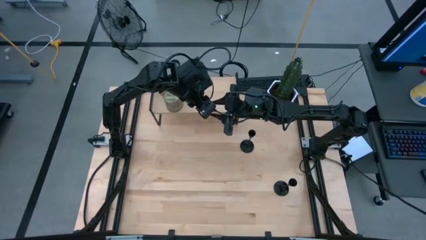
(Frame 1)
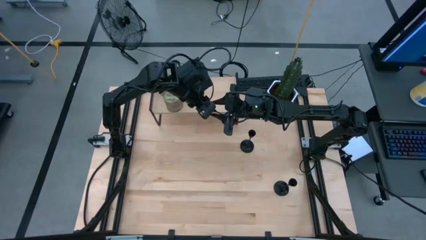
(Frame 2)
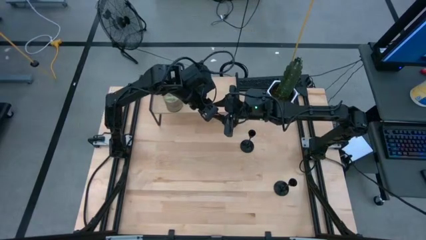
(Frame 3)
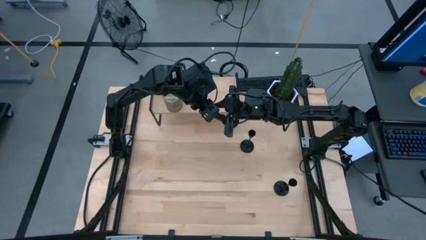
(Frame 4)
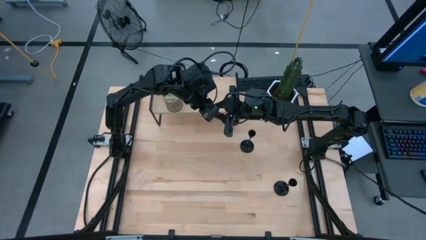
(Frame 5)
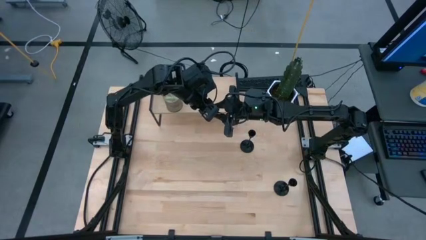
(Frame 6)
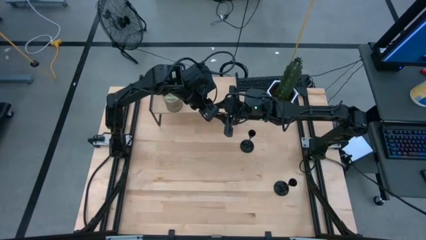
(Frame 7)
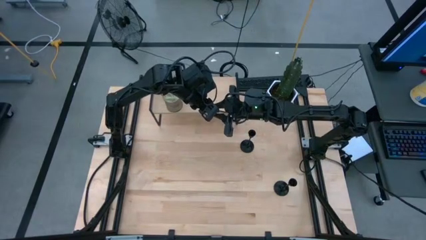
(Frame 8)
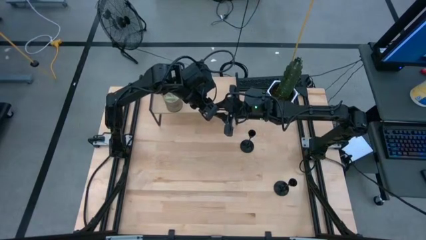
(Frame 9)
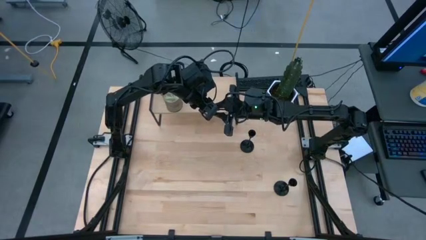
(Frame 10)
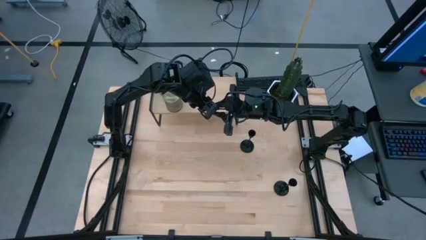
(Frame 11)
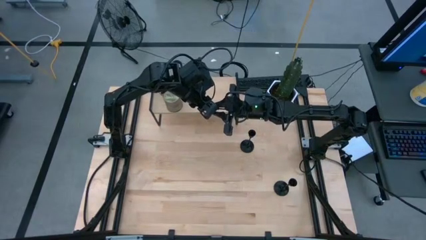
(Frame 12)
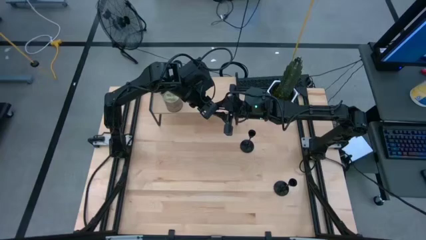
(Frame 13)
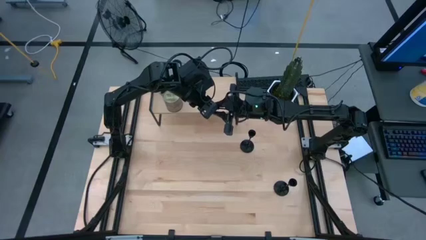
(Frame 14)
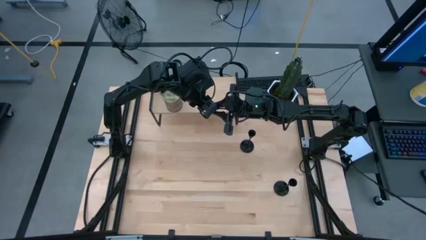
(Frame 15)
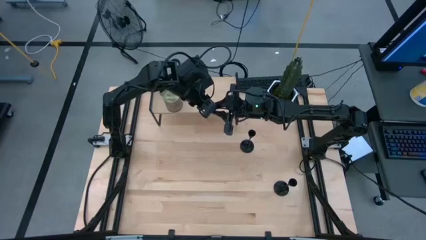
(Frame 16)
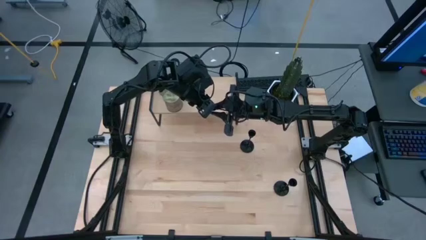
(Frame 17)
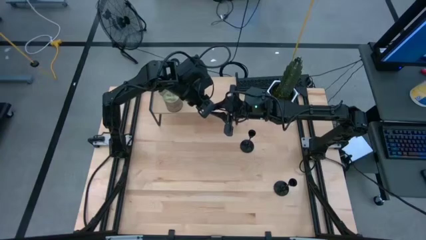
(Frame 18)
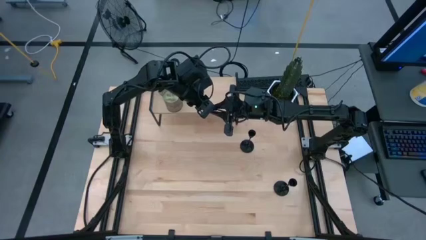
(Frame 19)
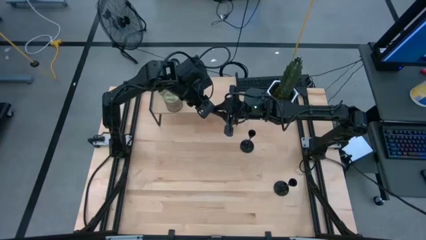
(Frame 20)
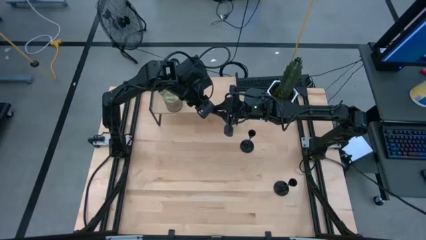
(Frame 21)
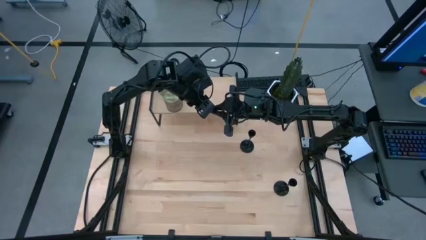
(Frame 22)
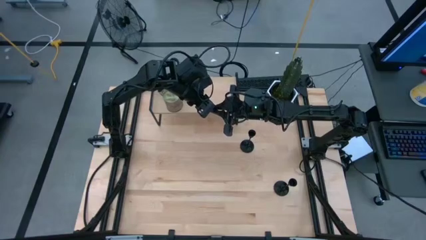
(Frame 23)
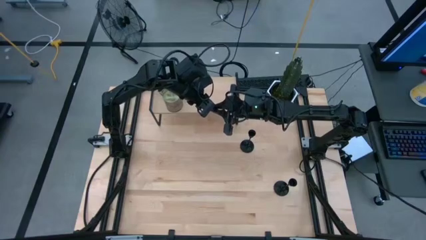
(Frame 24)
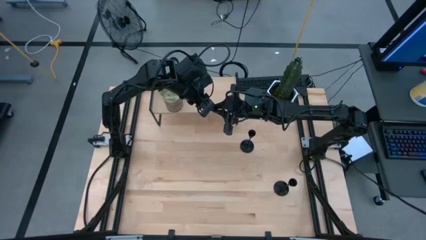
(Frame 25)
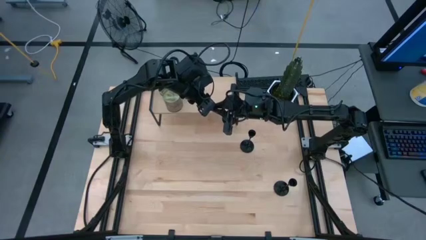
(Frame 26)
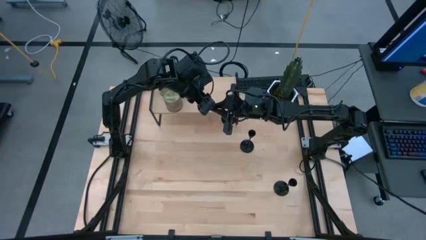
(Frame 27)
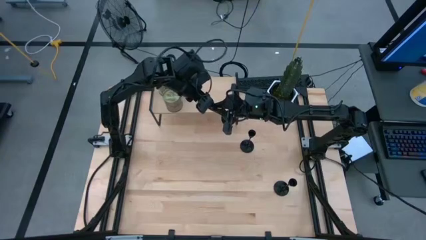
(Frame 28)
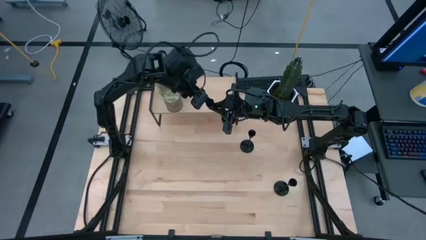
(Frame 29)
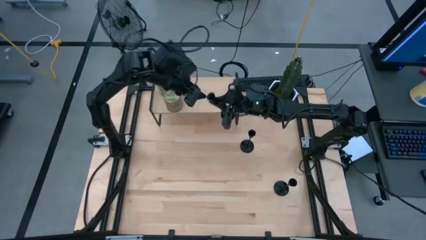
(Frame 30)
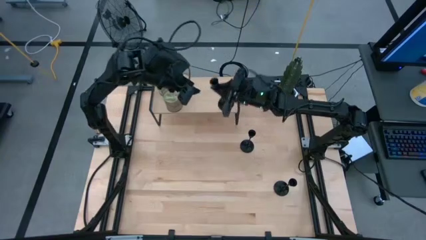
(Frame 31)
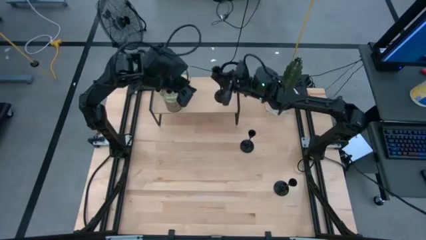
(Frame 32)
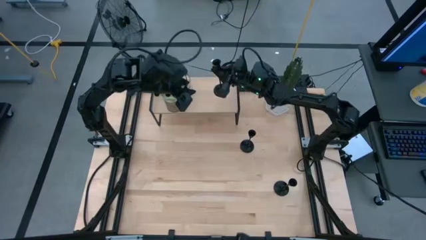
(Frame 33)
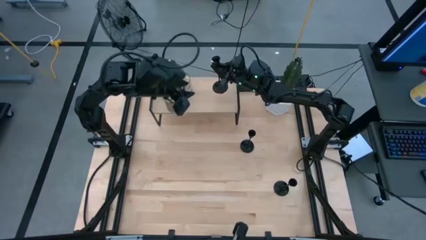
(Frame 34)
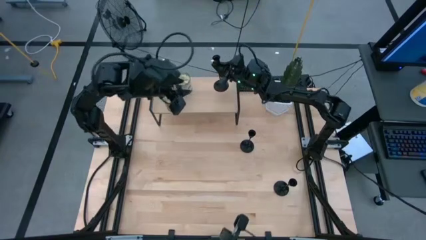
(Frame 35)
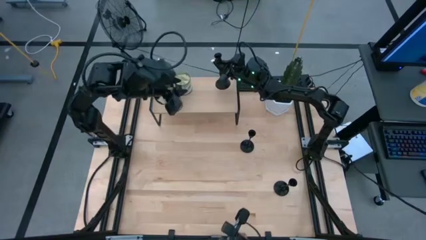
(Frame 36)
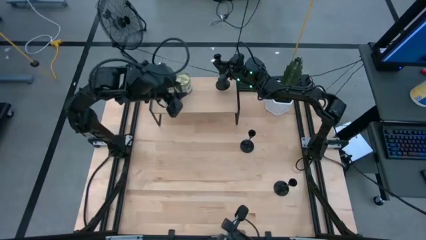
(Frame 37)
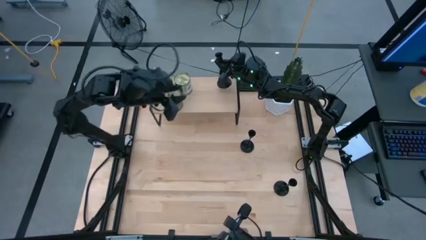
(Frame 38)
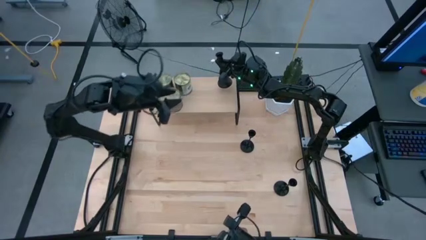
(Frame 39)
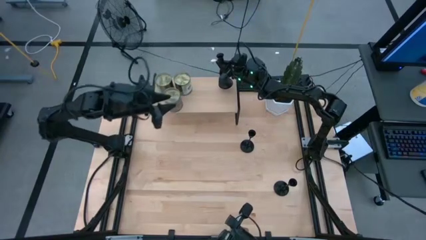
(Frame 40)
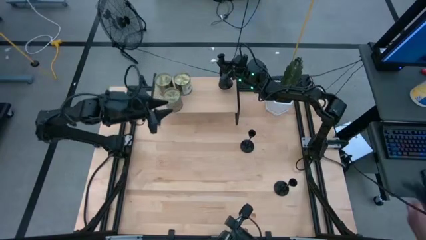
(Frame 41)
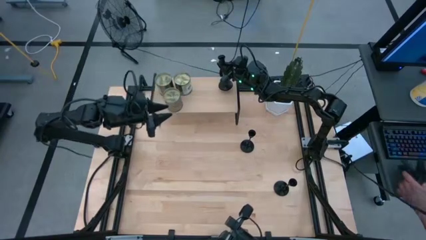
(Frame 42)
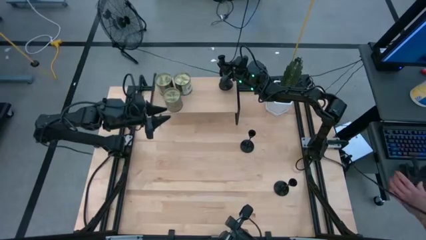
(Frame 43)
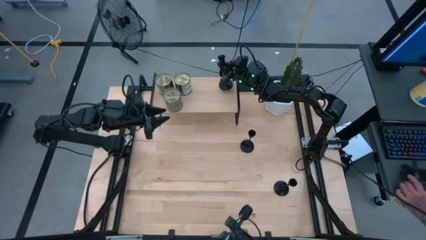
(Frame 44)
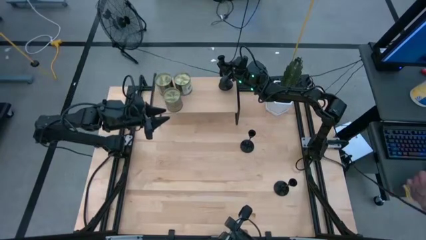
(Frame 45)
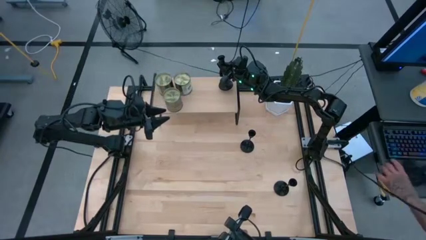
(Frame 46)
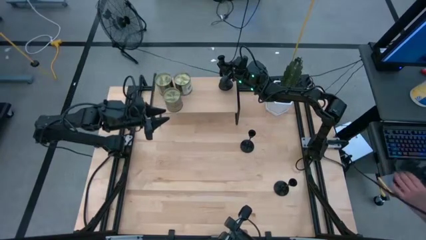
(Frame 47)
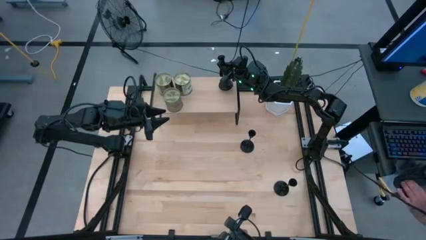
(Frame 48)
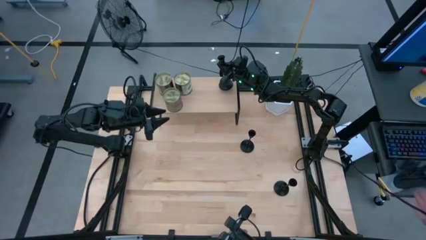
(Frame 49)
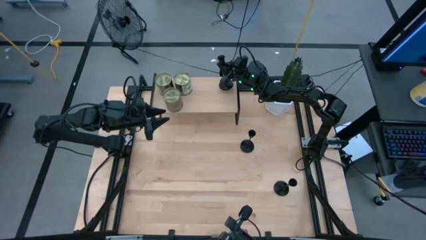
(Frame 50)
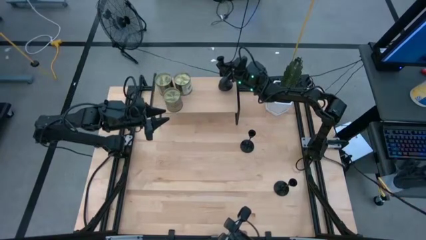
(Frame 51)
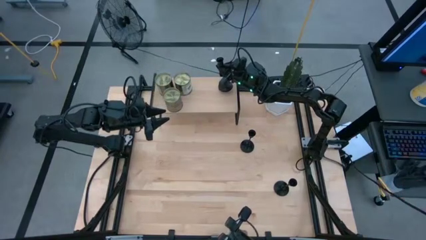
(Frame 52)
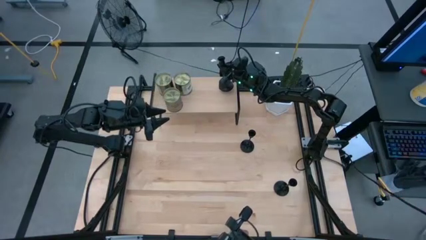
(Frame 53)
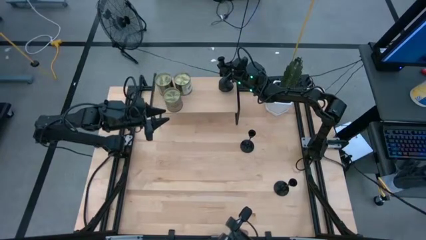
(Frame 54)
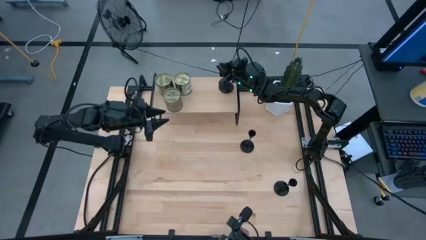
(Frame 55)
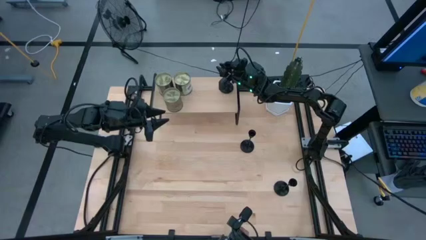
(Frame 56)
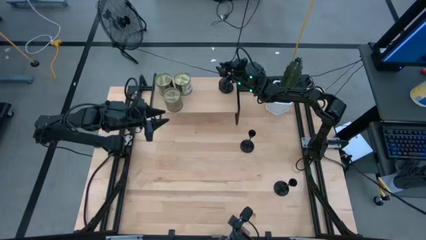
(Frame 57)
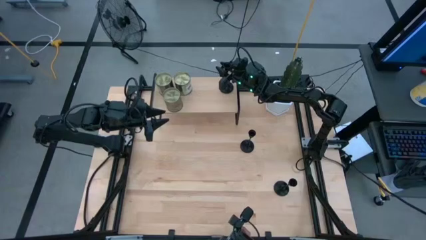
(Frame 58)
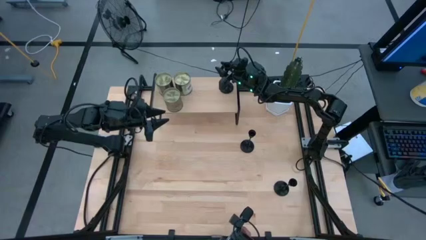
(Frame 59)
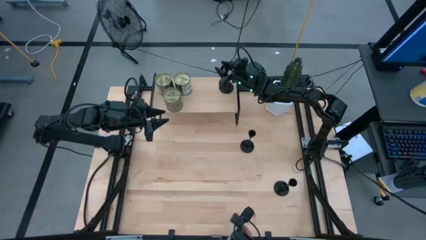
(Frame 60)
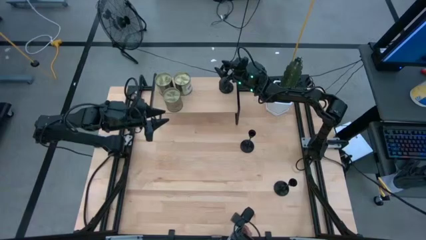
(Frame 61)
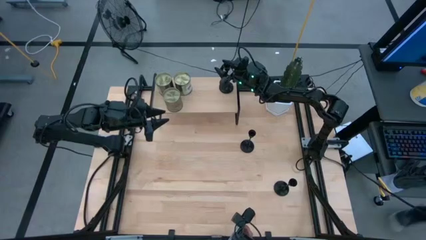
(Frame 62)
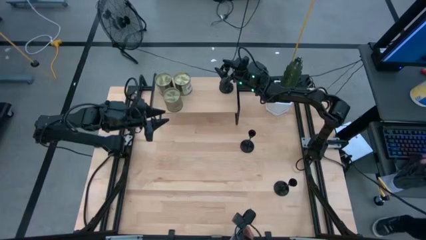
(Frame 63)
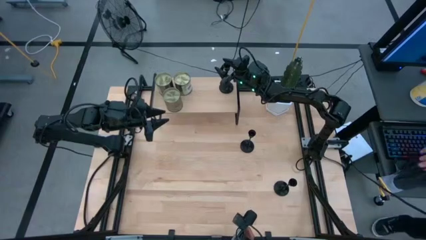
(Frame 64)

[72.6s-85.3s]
Task: Pick & Place candle stick holders
Put the bottom left black candle holder on the shelf

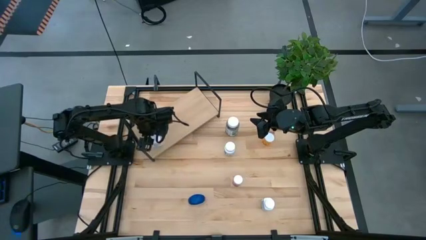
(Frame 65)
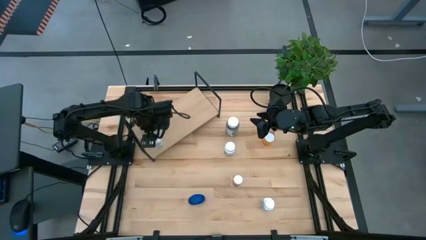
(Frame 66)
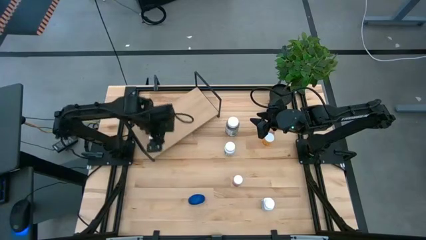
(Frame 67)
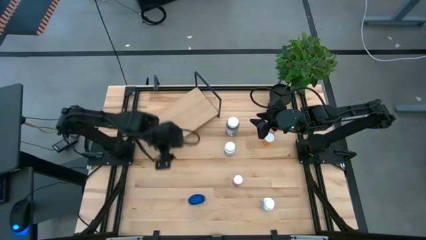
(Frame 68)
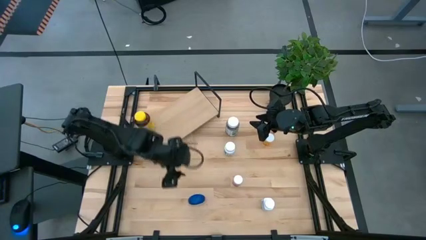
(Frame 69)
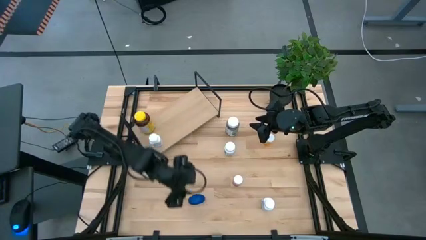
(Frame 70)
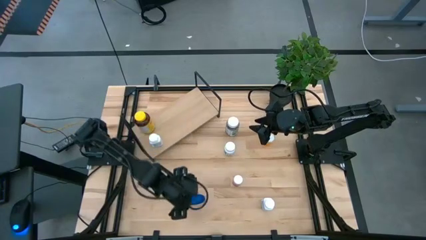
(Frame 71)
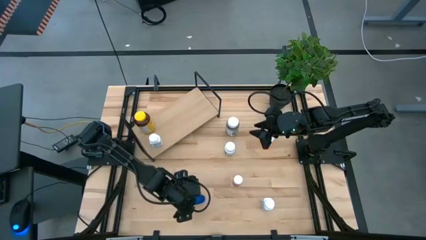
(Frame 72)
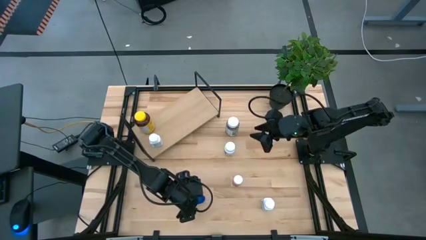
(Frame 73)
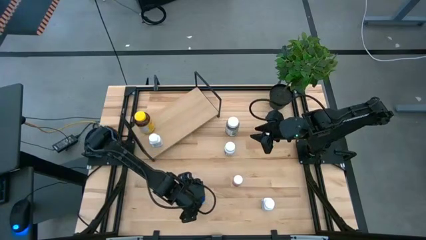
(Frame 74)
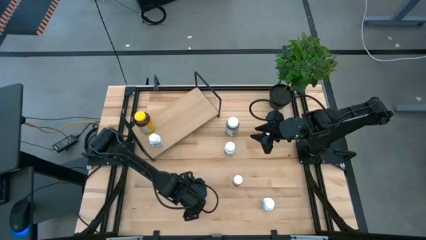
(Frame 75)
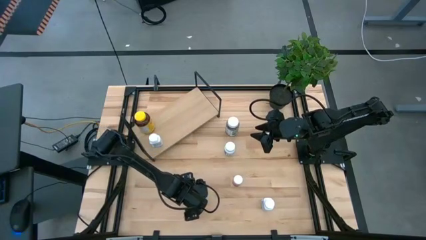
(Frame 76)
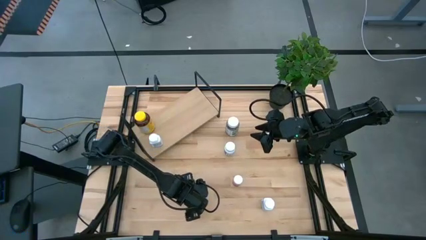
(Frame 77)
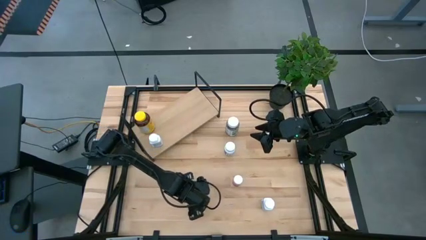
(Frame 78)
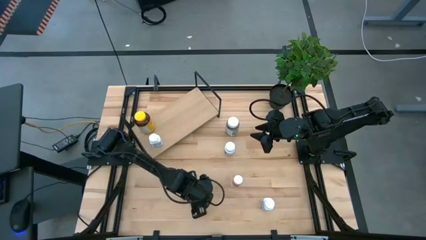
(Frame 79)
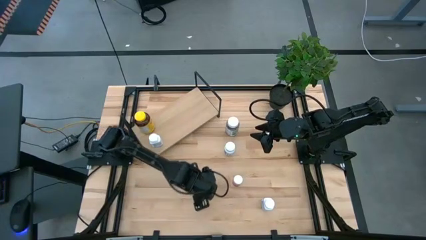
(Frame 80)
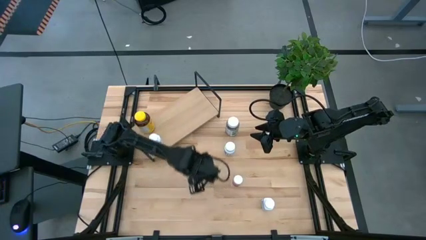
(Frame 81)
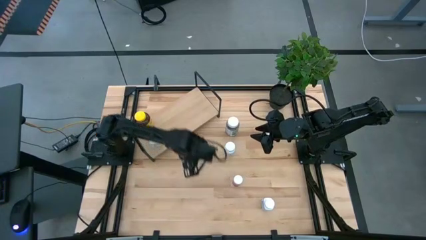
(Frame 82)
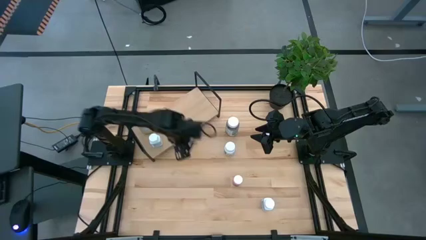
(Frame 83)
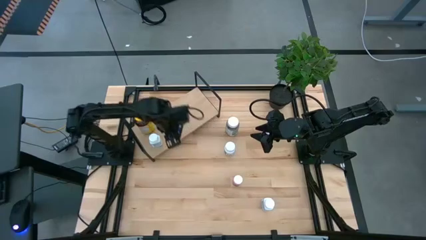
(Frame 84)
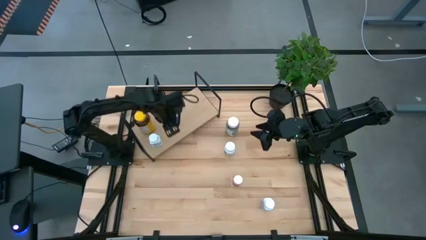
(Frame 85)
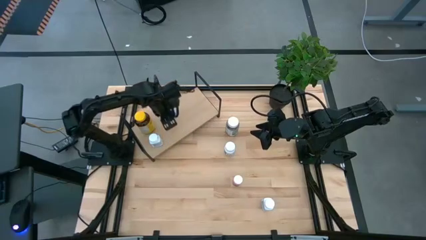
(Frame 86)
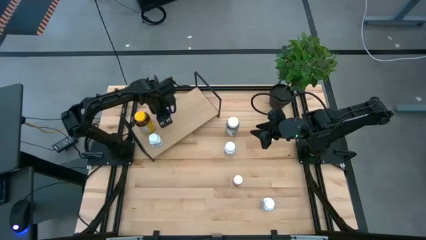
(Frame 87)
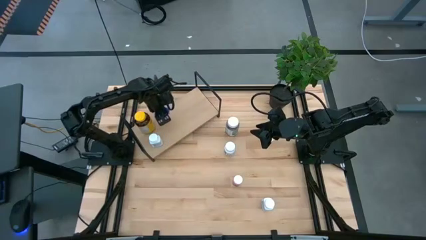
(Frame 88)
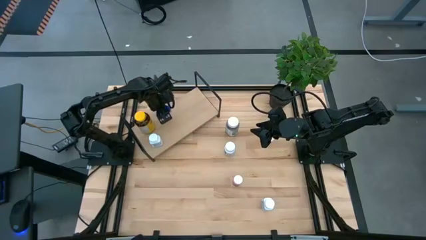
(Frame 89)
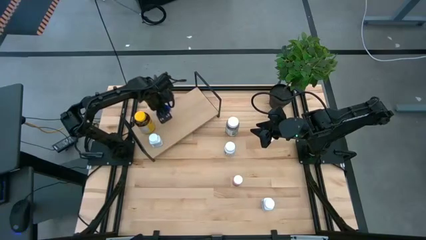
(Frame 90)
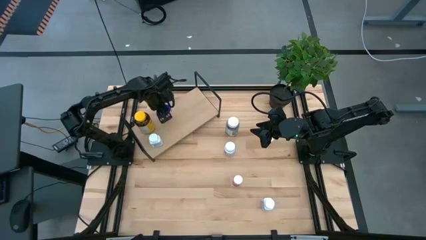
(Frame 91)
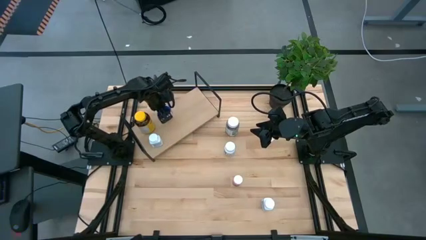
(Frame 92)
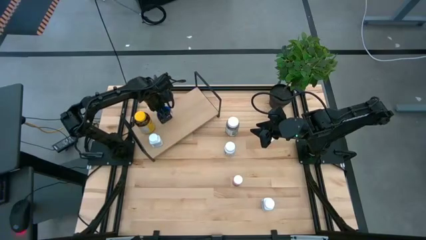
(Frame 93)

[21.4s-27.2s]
Task: Pick and place medicine bottles onto shelf by color
Put the blue medicine bottle on the shelf
